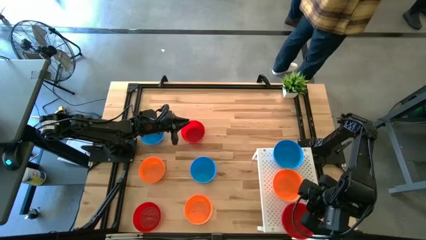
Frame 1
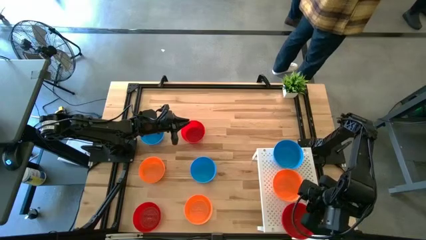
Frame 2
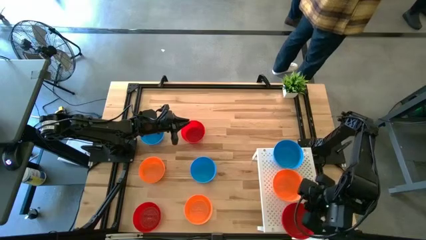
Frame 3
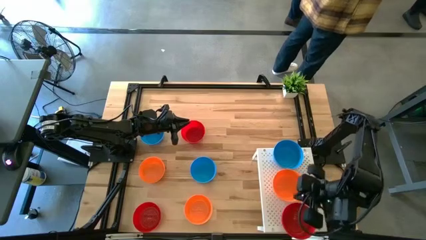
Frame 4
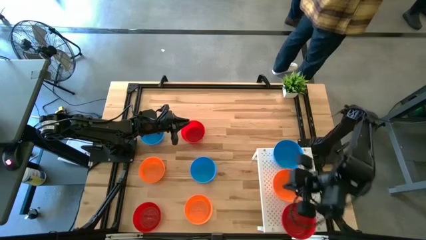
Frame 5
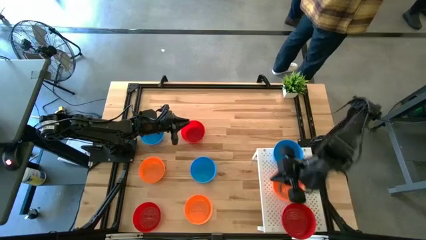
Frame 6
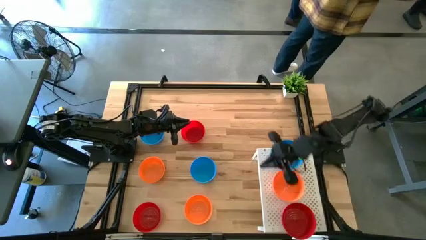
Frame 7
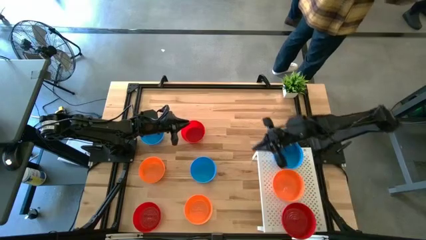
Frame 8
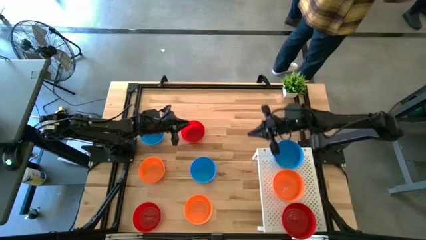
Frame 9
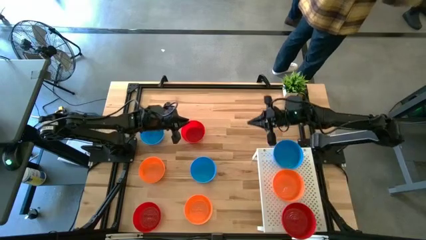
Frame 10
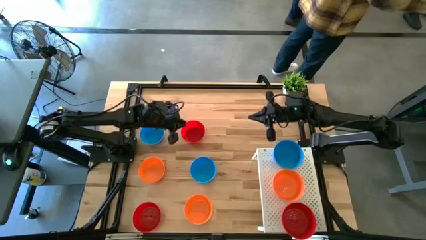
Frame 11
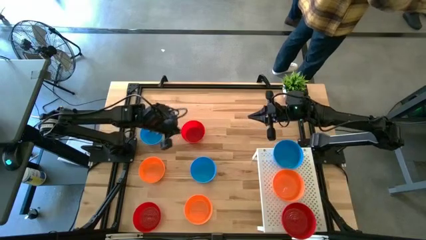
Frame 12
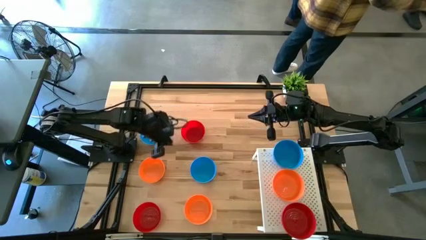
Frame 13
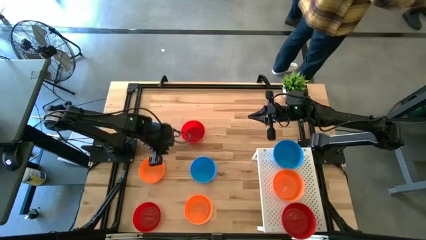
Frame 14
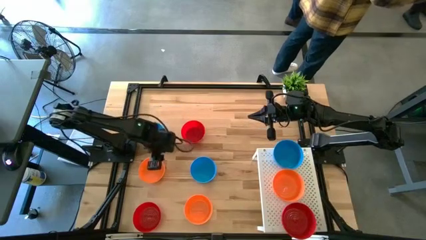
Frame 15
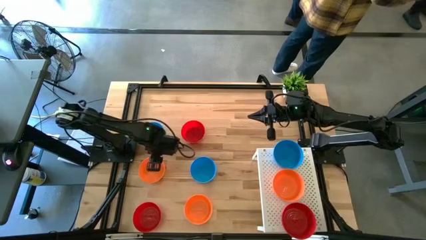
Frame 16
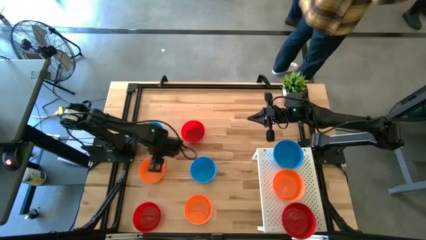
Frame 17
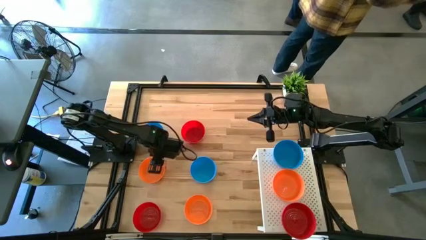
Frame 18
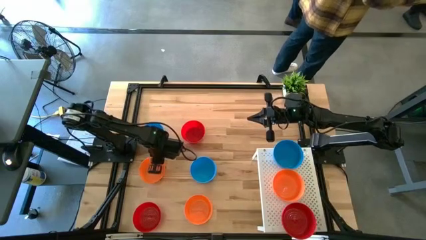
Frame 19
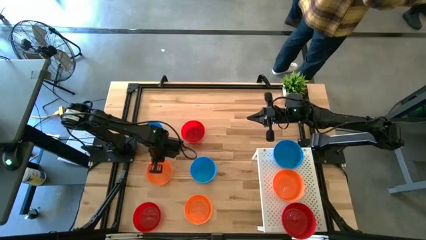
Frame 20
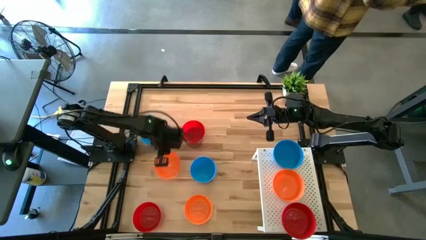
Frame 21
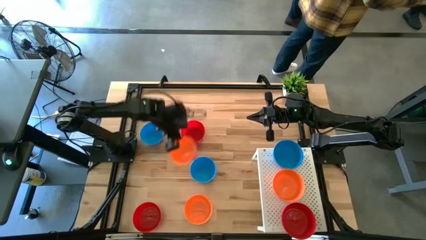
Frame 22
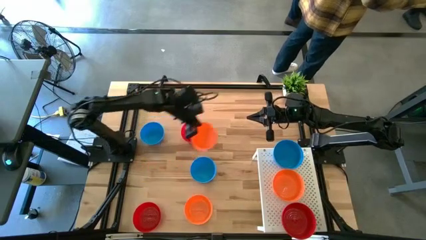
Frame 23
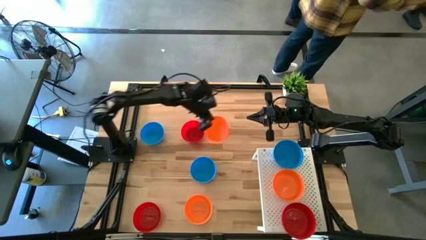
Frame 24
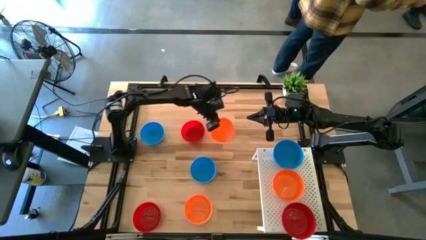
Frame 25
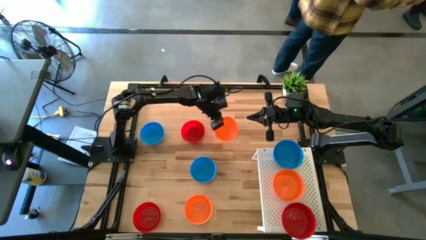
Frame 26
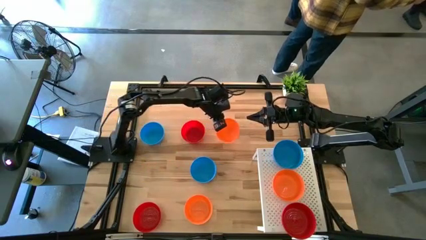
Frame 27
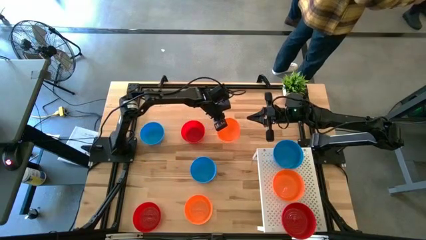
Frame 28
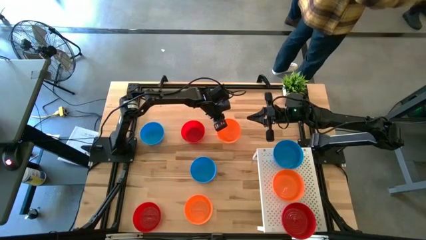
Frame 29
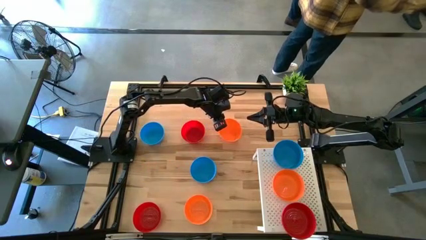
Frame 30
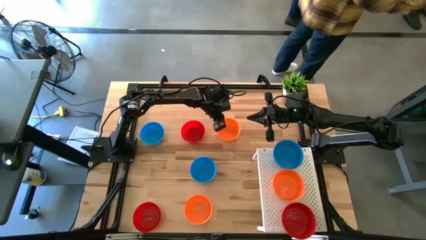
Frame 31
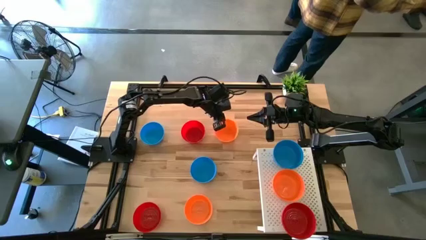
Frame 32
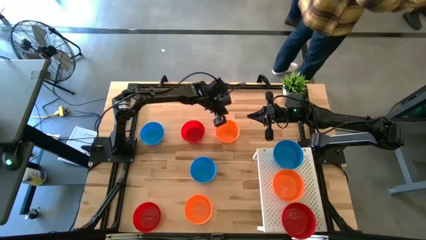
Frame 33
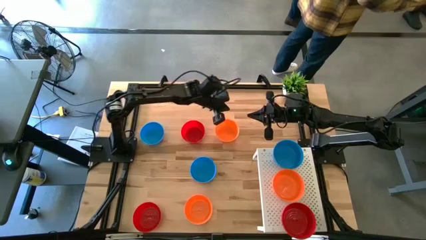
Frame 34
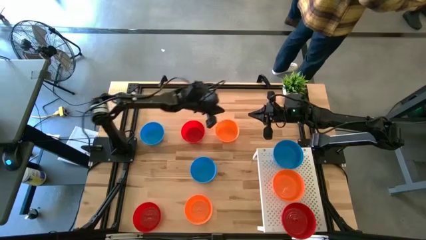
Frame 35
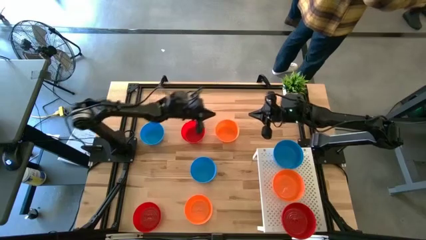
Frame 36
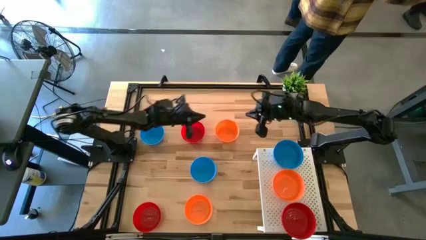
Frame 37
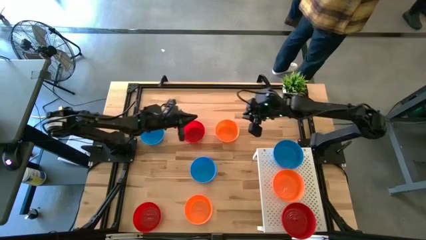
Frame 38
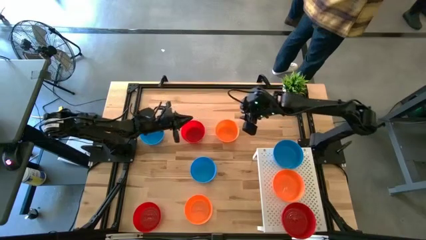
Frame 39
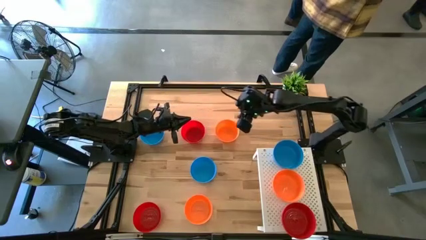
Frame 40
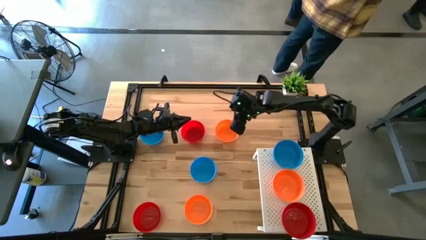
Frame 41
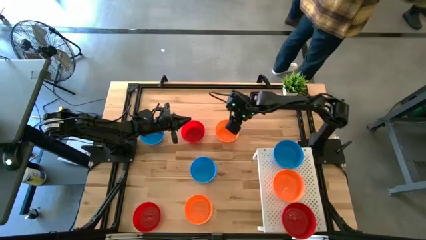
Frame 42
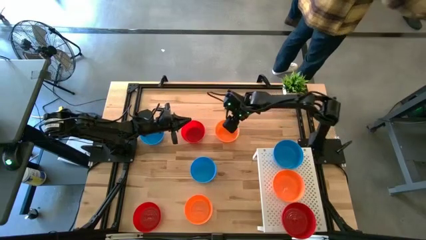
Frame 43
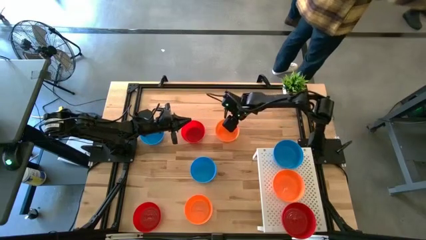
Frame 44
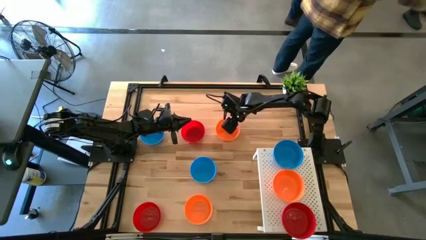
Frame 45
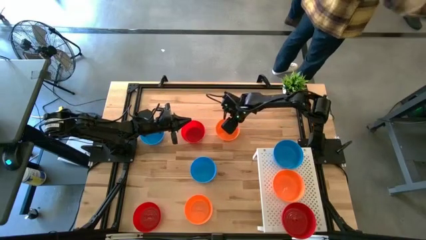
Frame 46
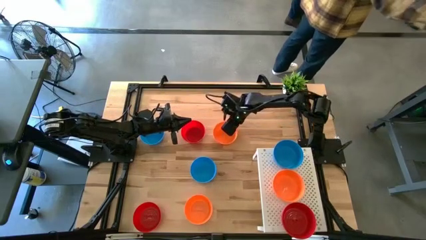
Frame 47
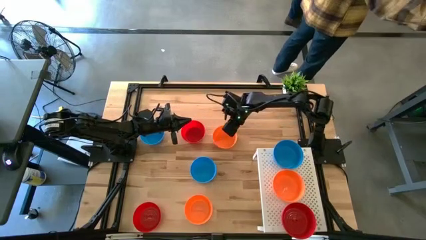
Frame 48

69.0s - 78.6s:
Task: Pick & Place Mini bowls
Stack the orange bowl on top of the other orange bowl on the shelf

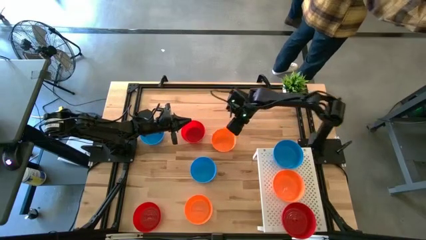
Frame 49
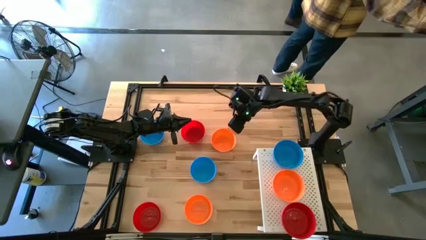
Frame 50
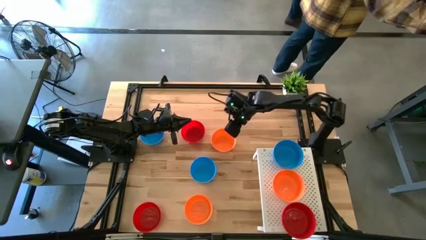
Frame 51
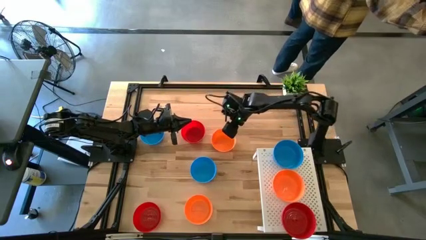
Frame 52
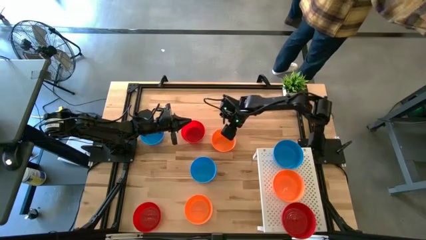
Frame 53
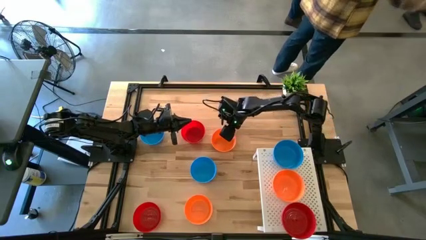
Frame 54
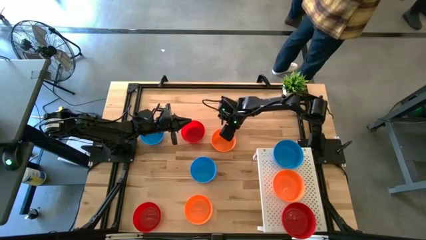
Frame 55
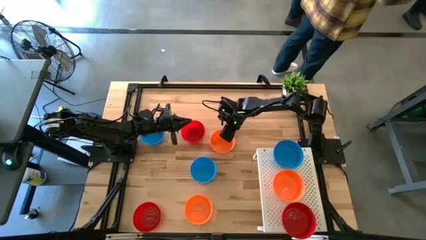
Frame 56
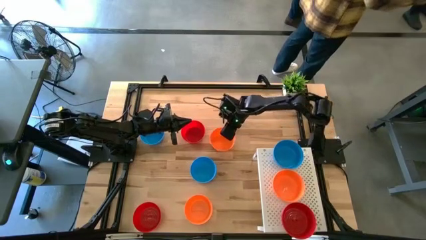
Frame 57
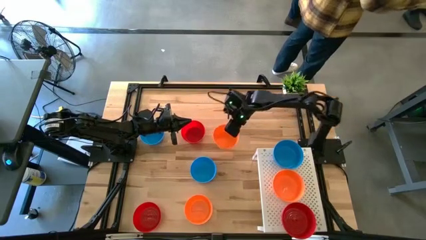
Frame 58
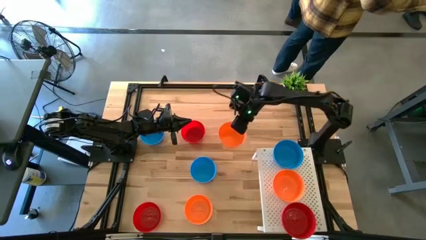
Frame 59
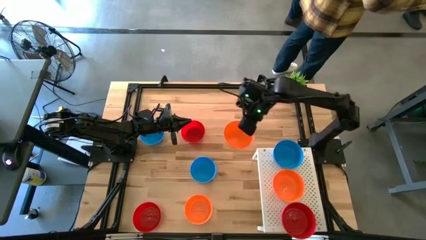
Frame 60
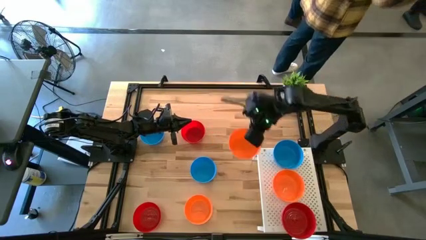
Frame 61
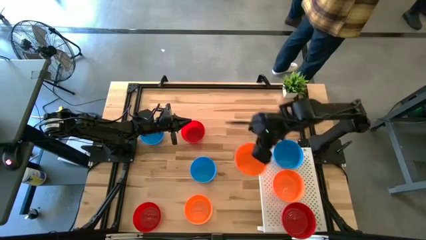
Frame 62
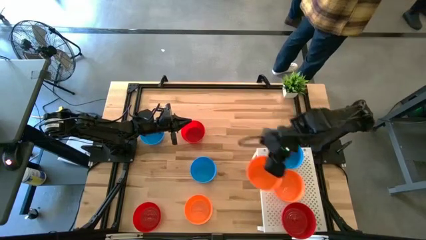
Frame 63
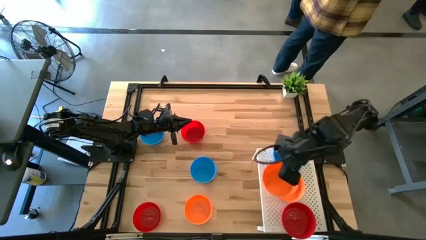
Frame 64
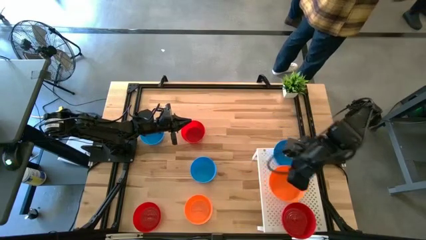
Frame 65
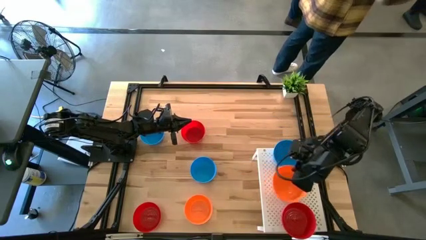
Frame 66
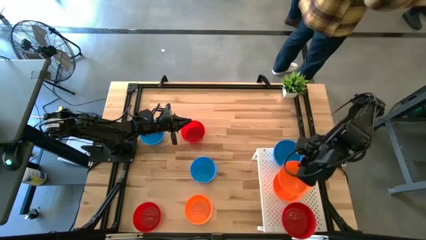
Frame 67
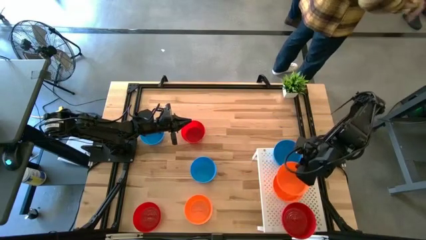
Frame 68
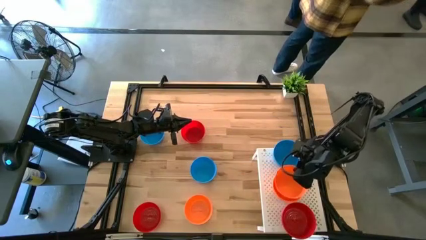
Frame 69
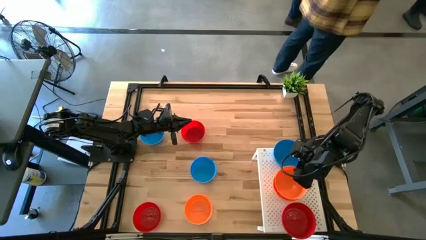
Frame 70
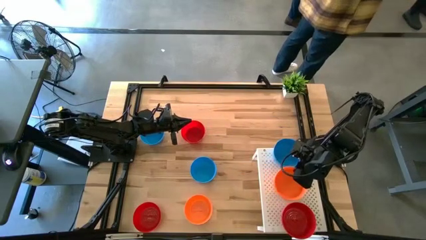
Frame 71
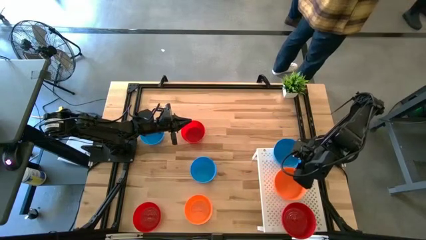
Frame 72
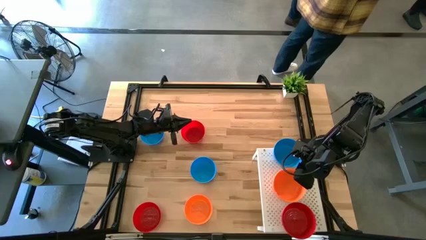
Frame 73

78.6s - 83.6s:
Stack the orange bowl on top of the other orange bowl on the shelf
